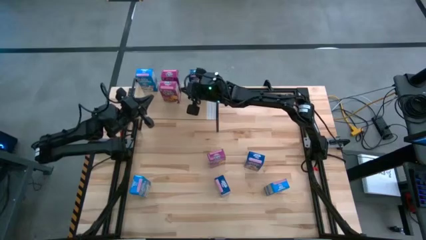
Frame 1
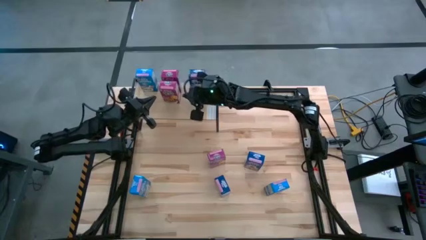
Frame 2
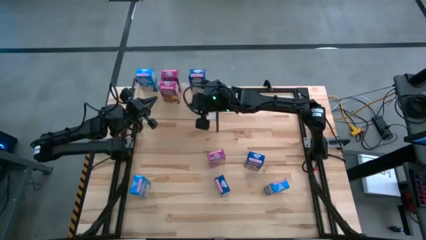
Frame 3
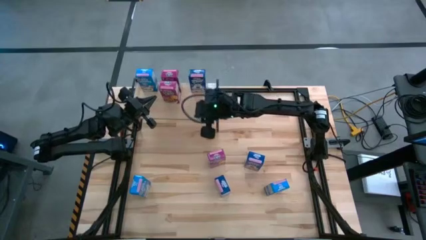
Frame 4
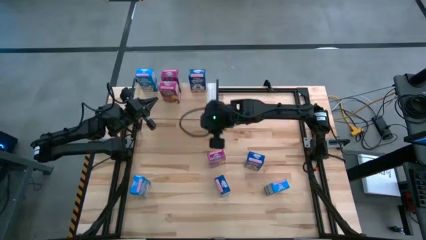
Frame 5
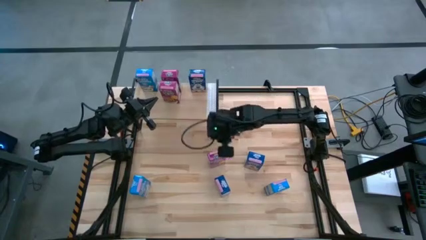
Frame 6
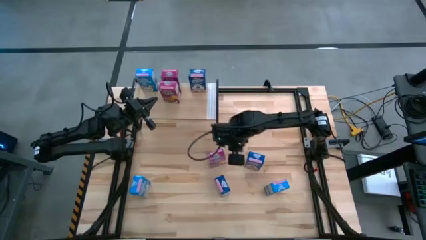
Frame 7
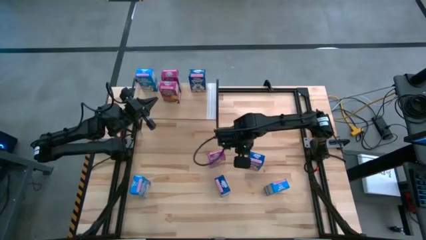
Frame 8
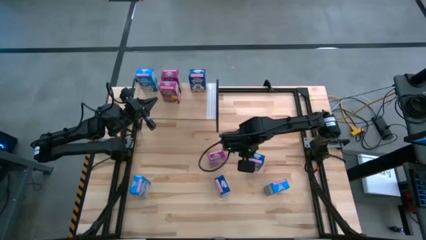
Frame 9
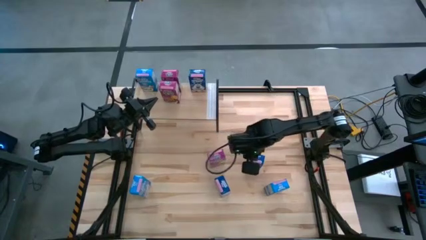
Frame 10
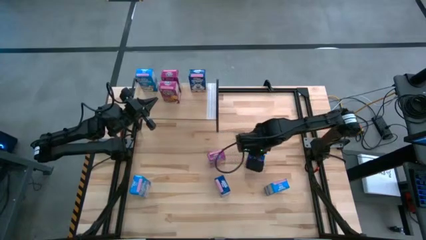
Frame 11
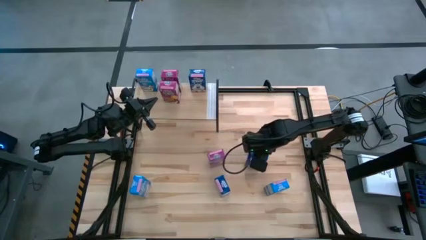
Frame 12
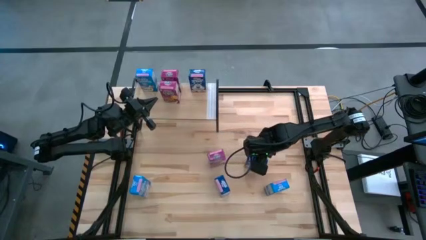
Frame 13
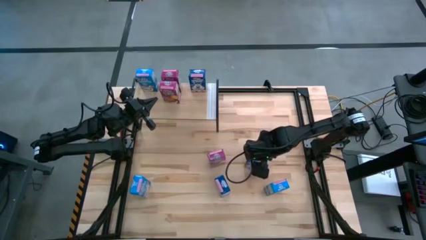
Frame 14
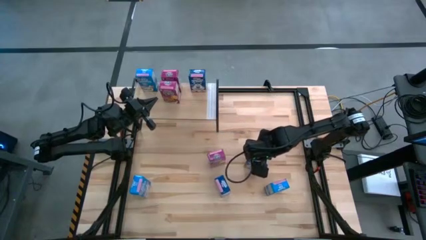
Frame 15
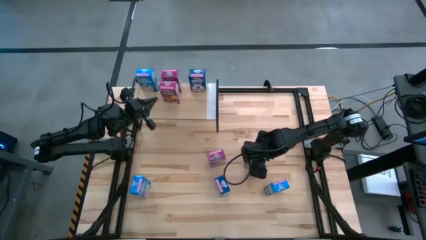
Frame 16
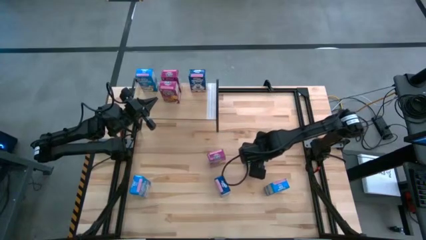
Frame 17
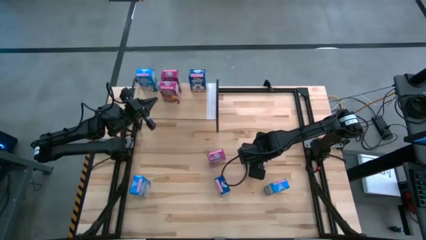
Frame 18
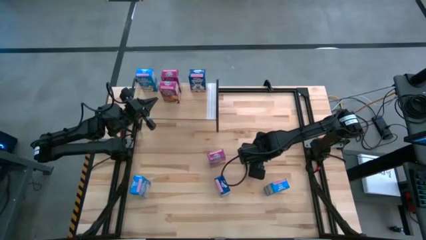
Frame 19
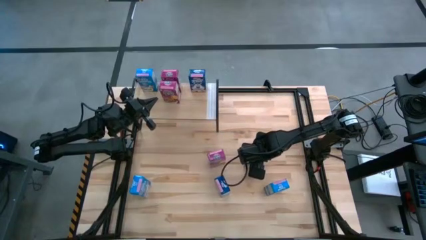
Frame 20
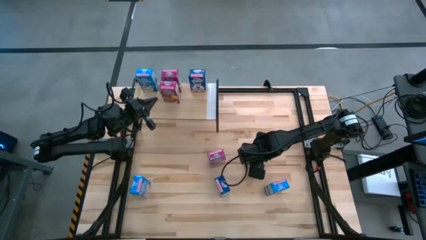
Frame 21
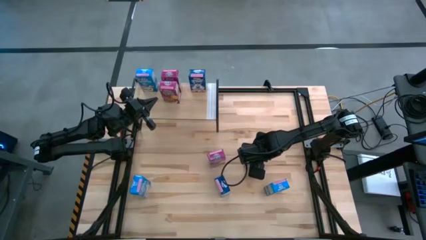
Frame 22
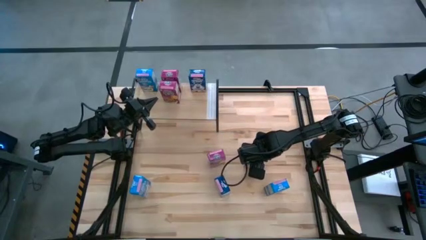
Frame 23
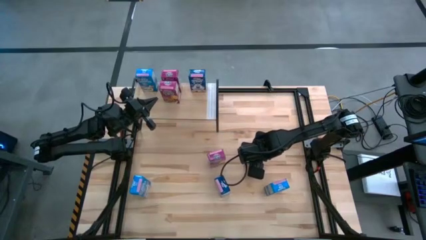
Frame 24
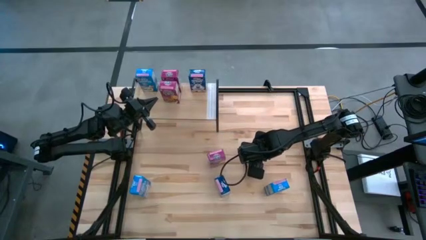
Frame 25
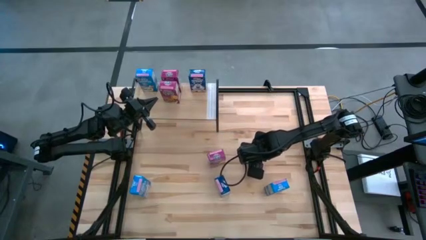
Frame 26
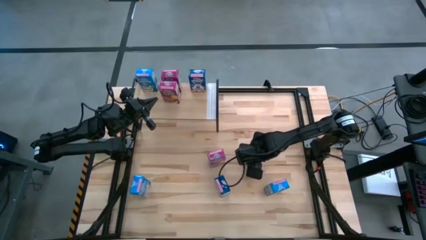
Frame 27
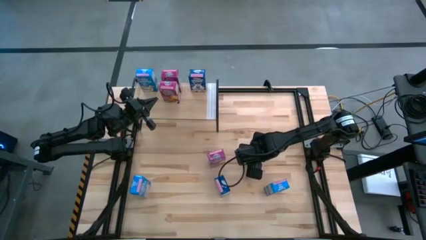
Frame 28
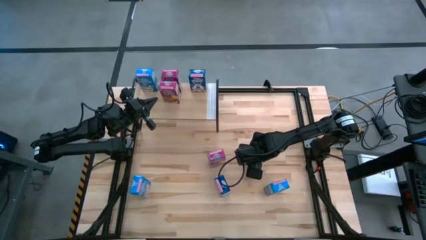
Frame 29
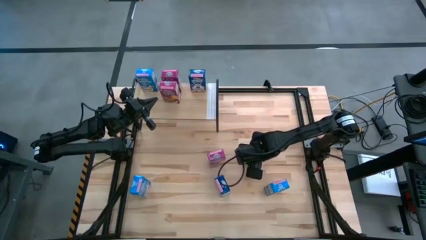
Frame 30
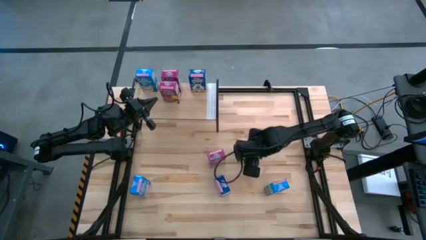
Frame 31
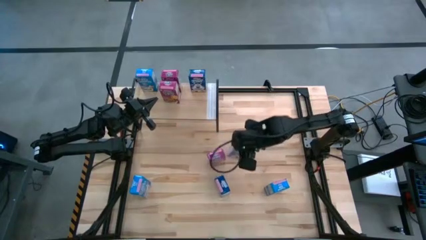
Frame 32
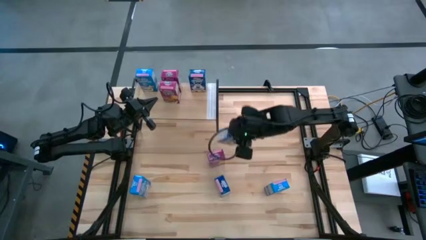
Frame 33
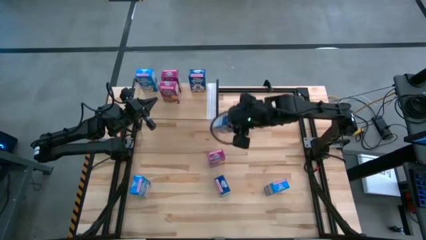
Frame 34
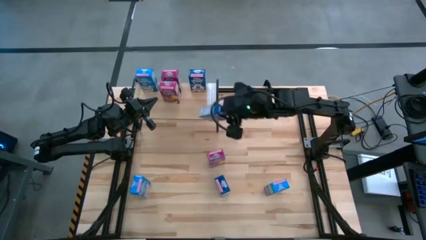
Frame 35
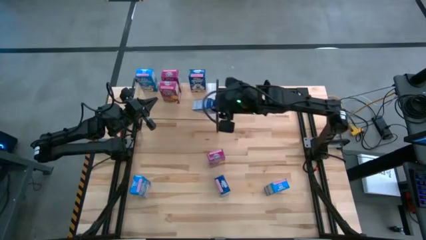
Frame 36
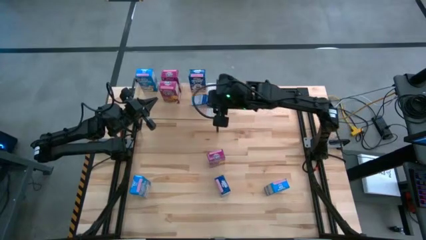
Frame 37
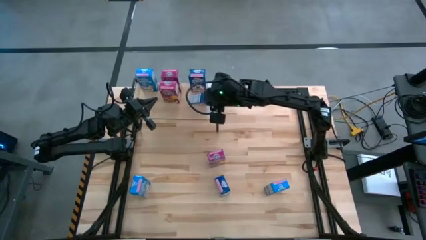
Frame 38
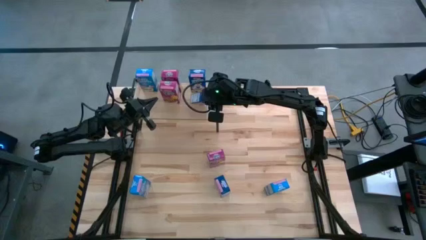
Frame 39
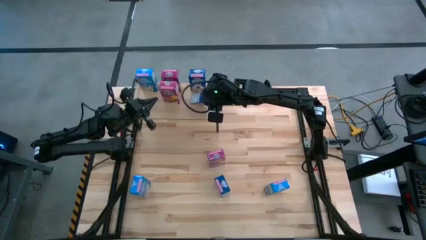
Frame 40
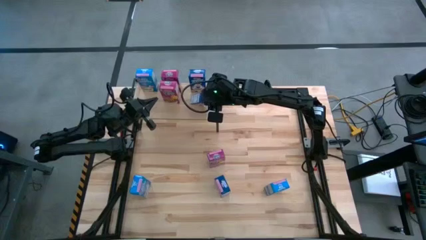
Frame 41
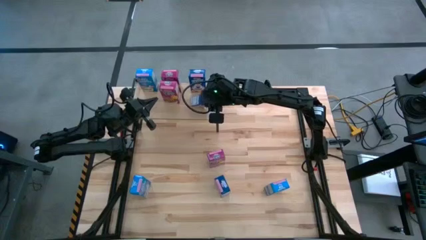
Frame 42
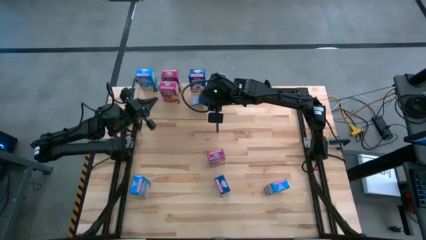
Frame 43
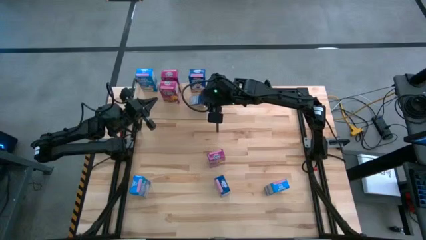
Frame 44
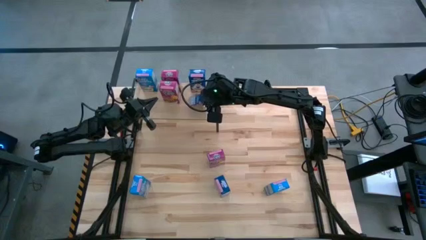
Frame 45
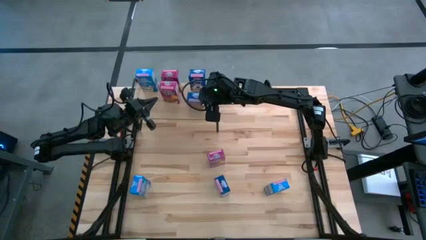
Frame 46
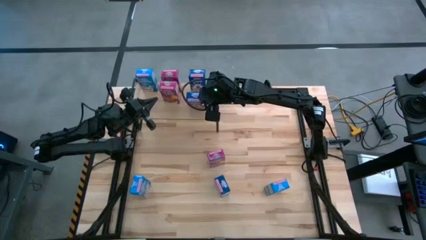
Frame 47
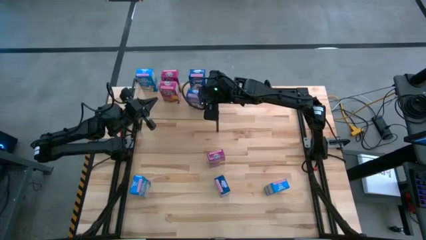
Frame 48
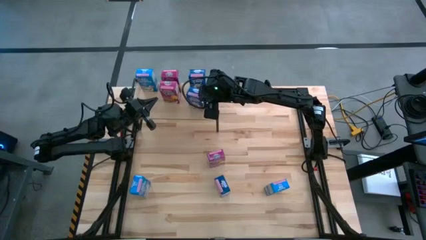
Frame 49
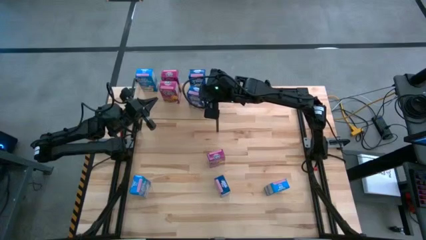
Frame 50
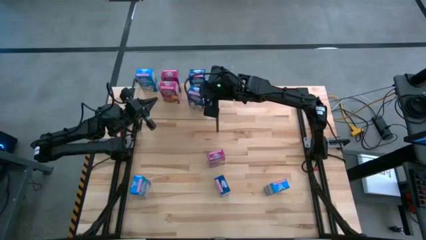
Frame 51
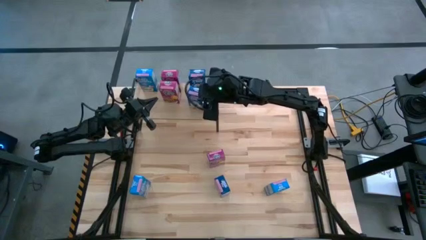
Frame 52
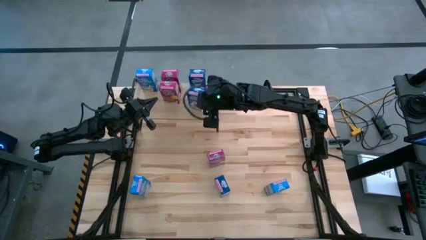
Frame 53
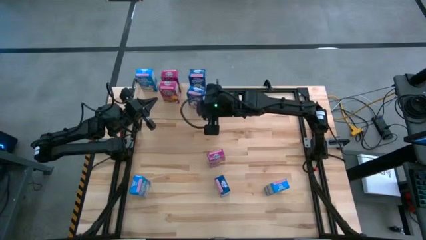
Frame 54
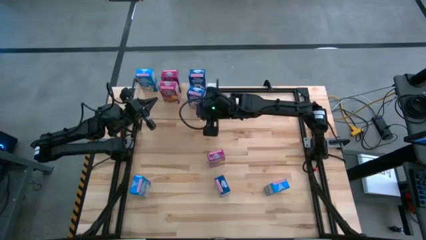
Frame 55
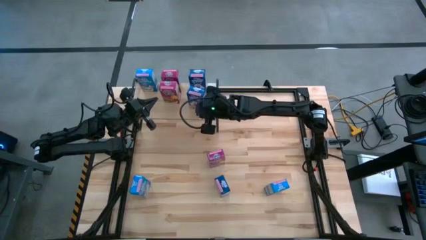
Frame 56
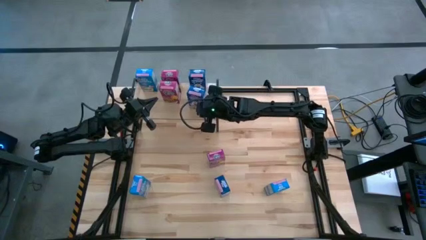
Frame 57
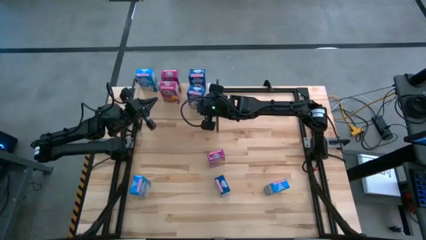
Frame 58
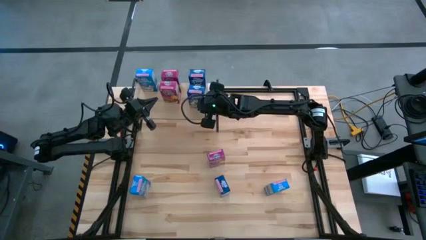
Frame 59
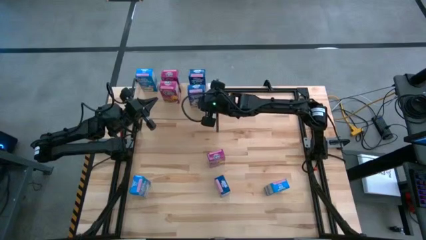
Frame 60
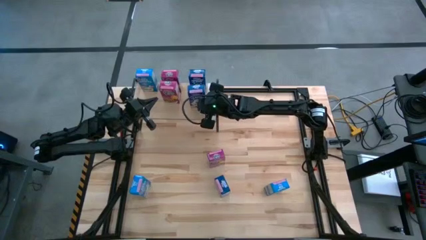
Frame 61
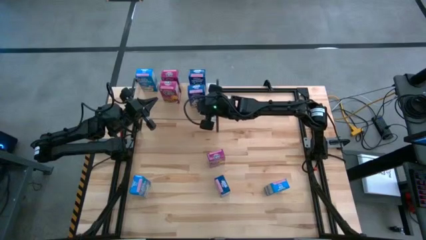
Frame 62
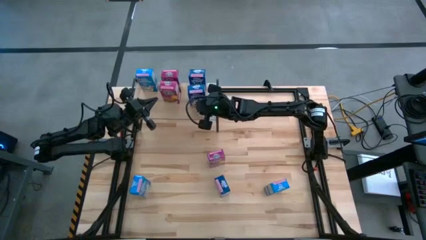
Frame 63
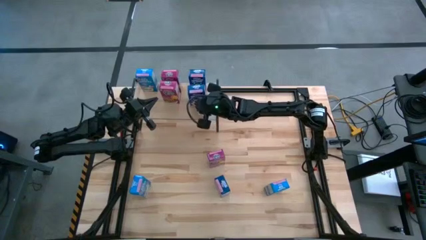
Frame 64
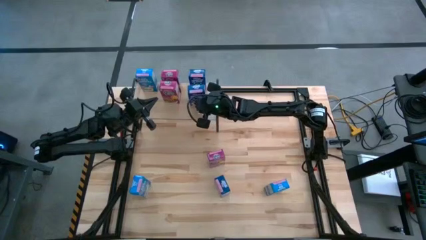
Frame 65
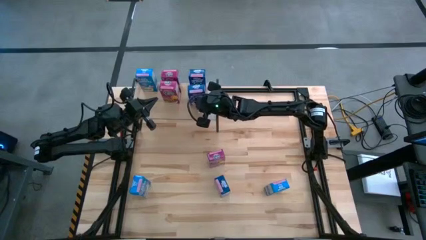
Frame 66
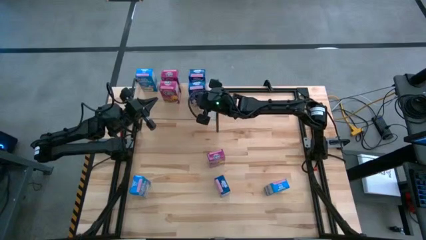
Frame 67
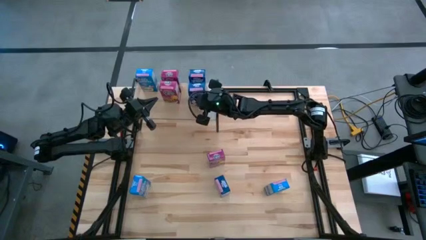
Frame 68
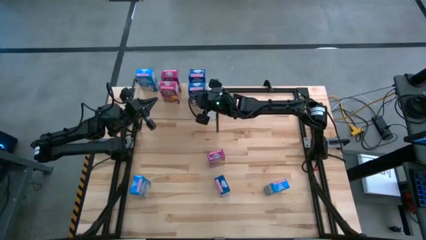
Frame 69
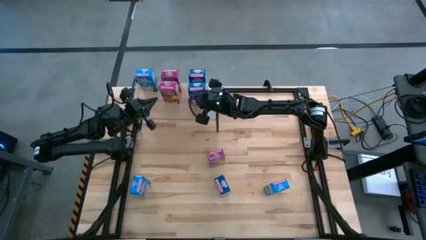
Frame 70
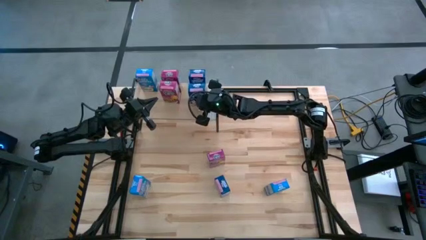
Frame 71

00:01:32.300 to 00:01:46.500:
Task: Stack cereal on shelf
Put the top blue cereal box on the shelf

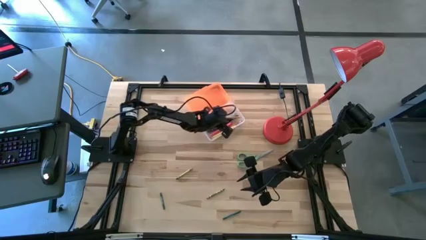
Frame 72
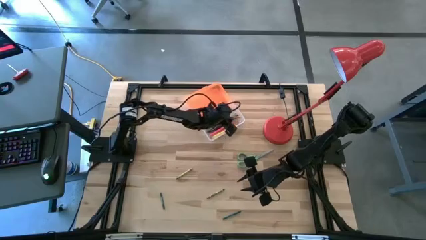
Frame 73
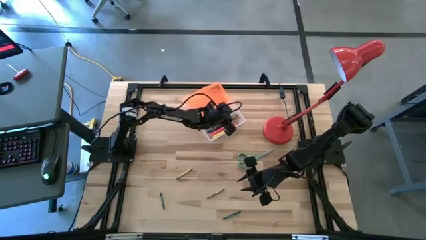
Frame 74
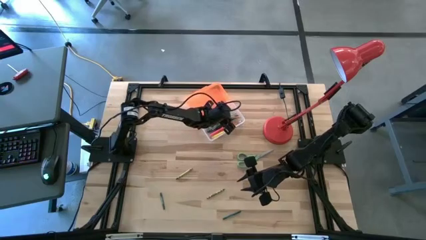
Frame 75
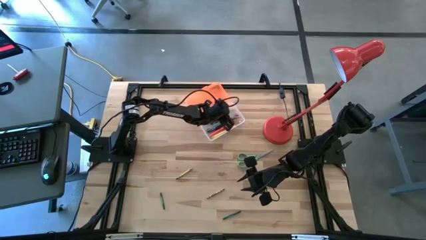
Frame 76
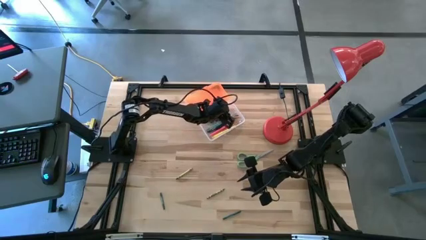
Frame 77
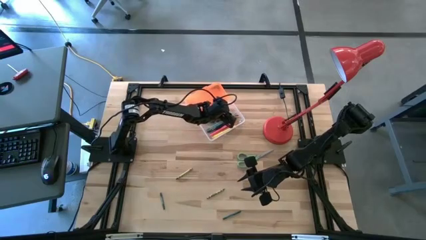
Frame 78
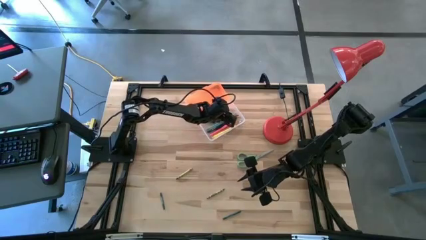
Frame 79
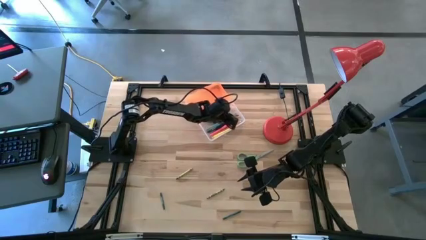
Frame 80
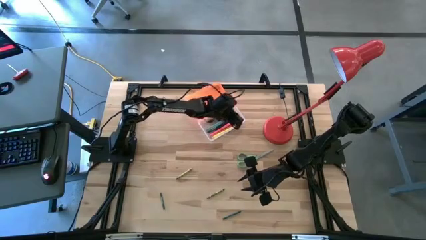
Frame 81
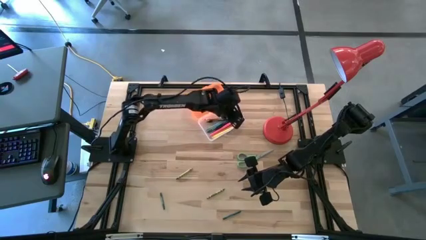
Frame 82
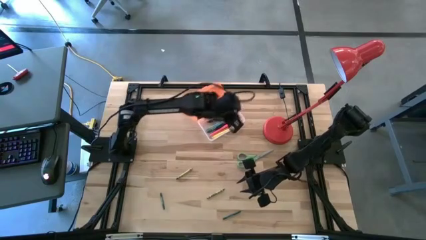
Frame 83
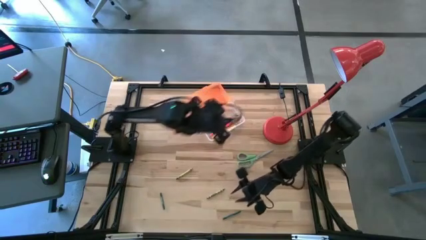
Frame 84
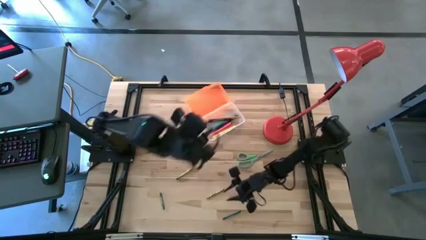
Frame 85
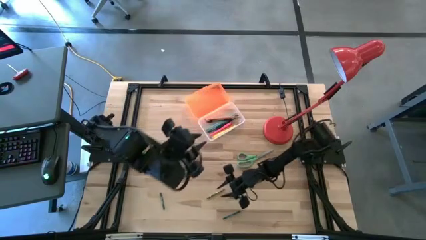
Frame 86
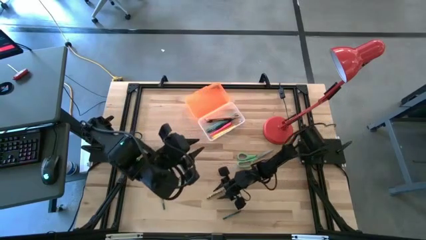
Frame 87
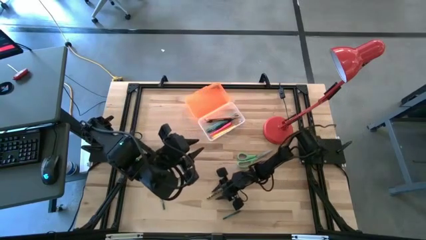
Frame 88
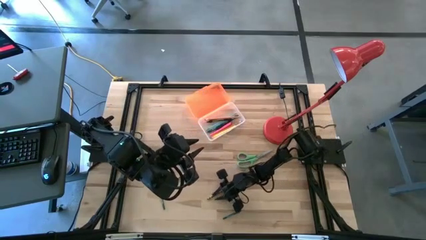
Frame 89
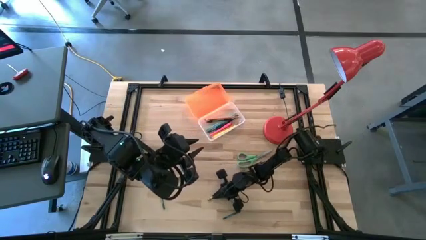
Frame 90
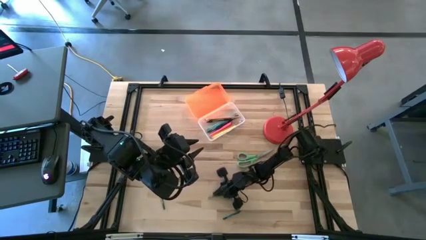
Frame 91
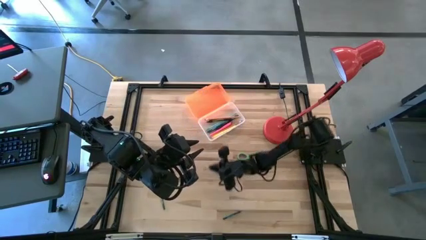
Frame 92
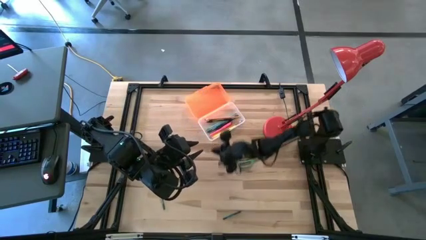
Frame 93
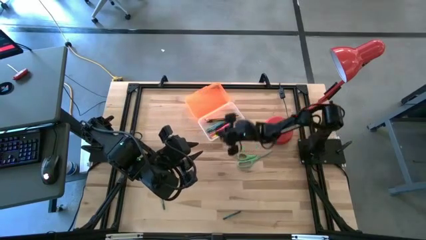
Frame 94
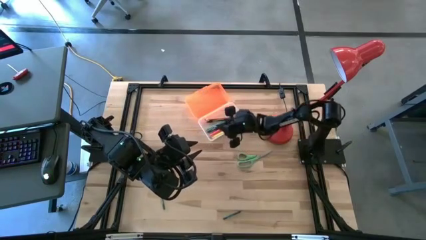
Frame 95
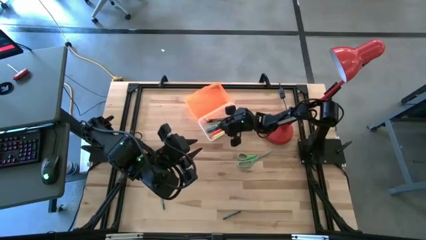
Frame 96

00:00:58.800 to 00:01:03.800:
Task: Pick & place school supplies into a supply box
Put the green crayon into the orange supply box
